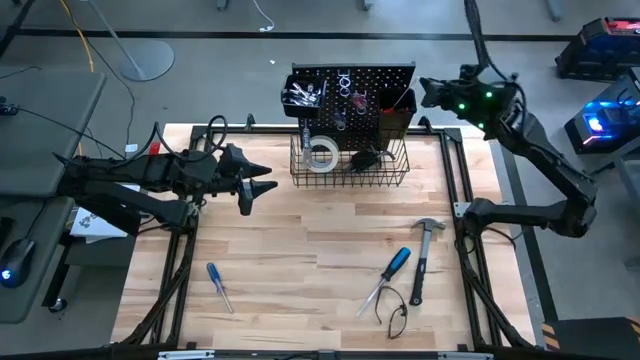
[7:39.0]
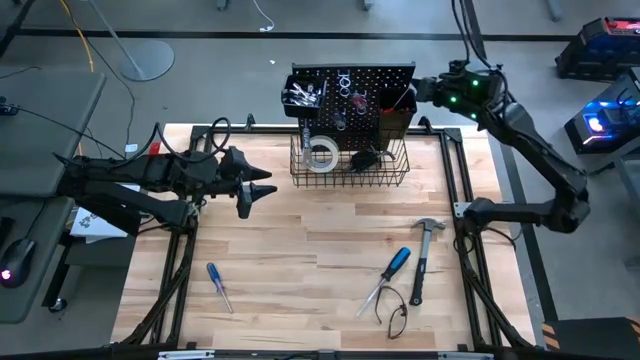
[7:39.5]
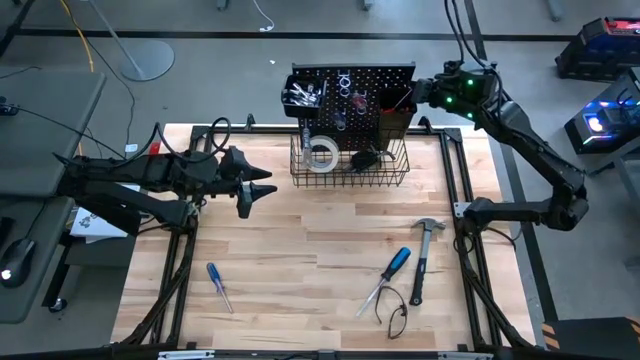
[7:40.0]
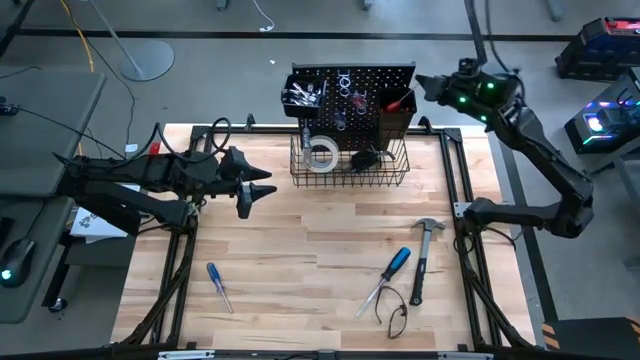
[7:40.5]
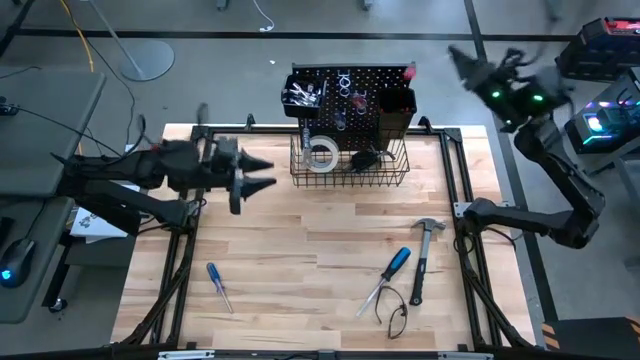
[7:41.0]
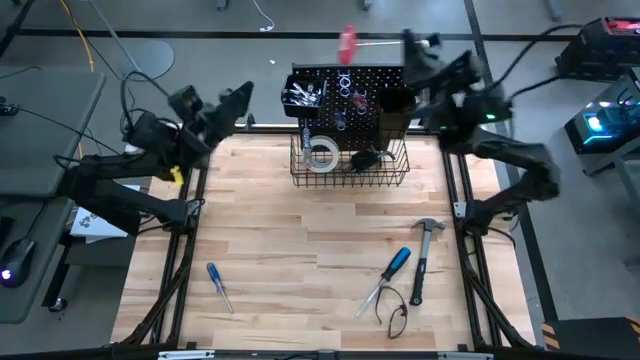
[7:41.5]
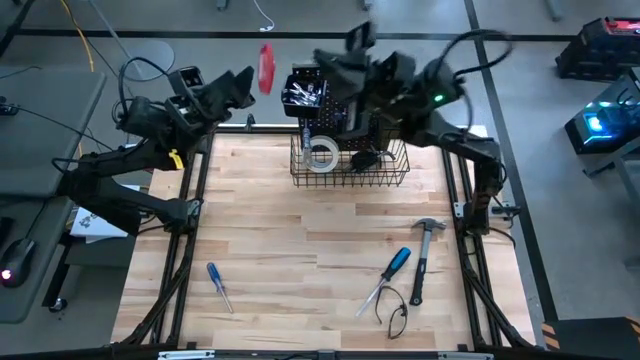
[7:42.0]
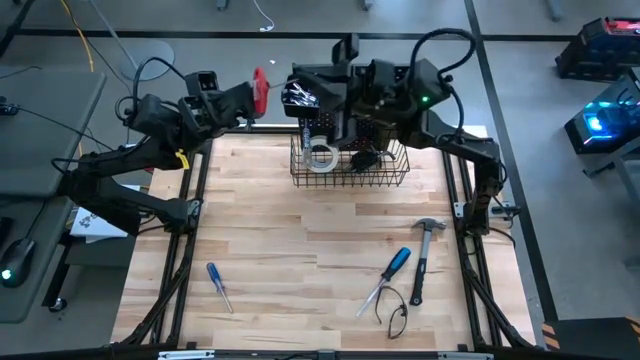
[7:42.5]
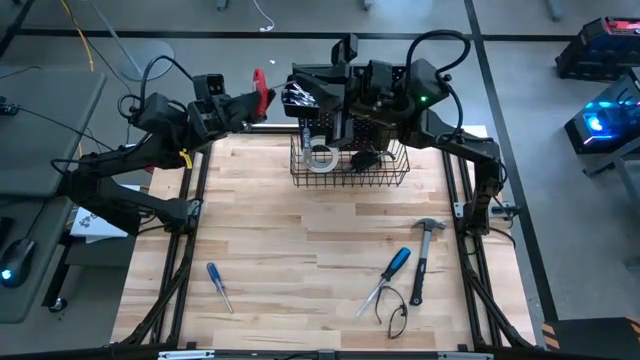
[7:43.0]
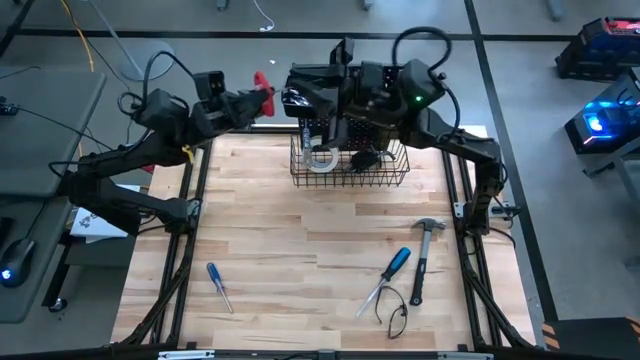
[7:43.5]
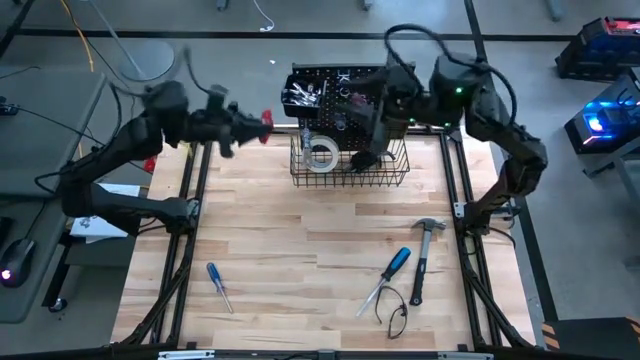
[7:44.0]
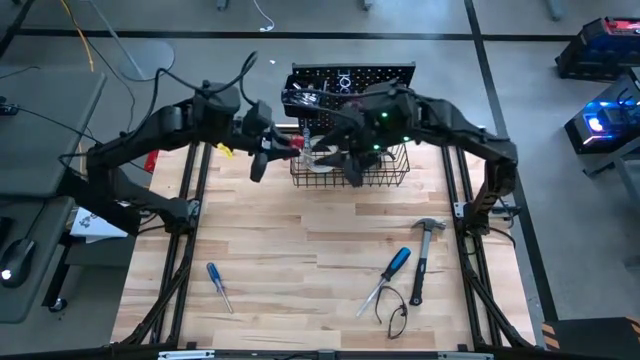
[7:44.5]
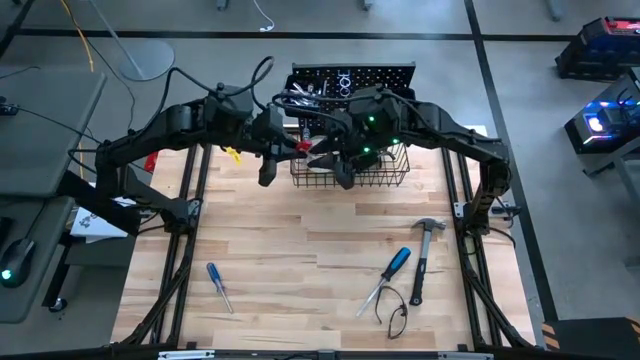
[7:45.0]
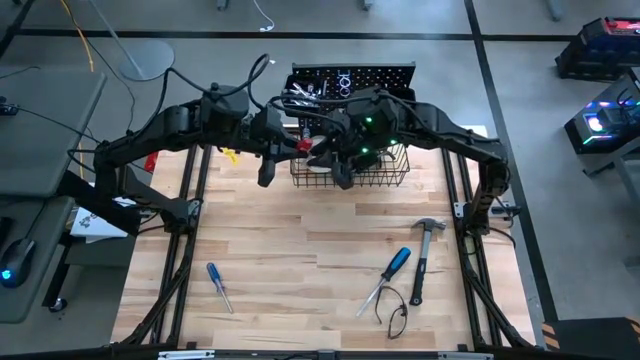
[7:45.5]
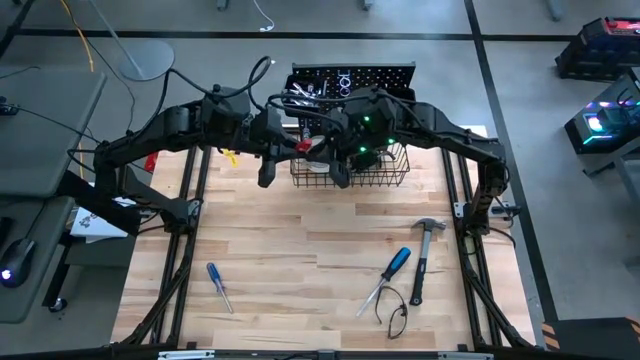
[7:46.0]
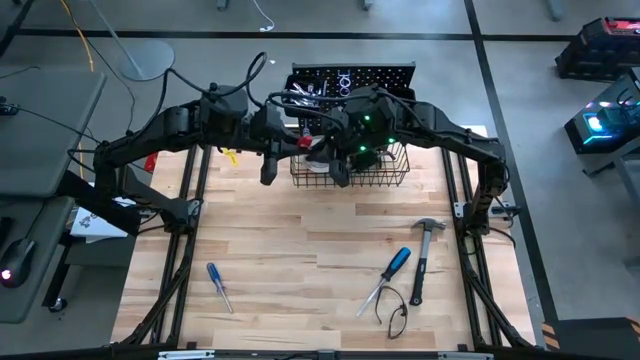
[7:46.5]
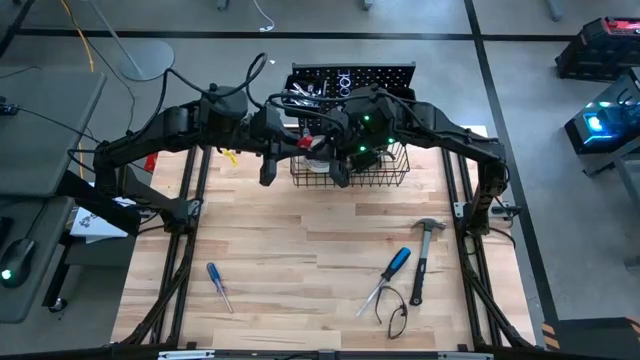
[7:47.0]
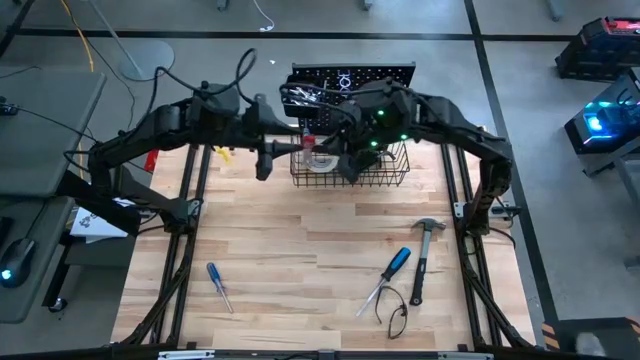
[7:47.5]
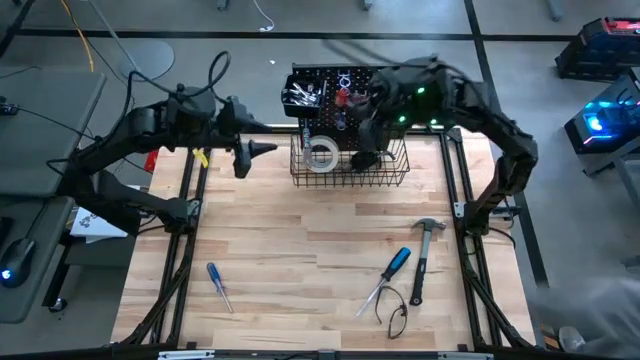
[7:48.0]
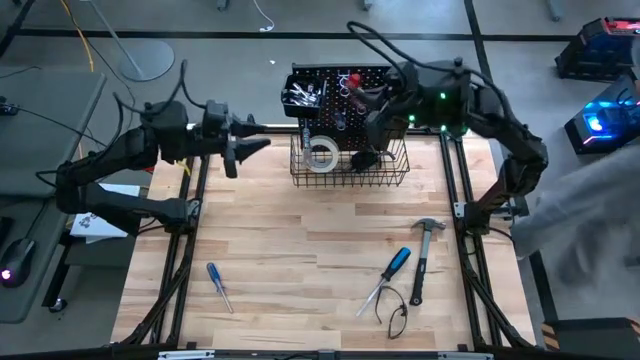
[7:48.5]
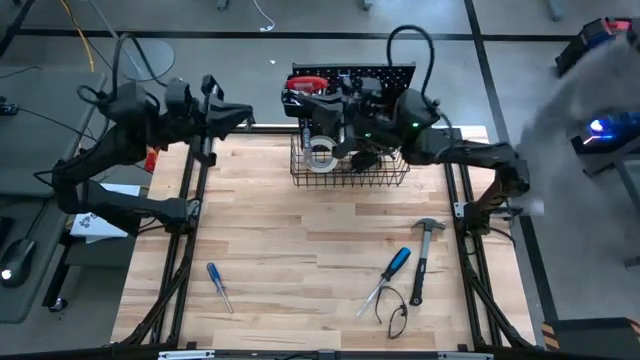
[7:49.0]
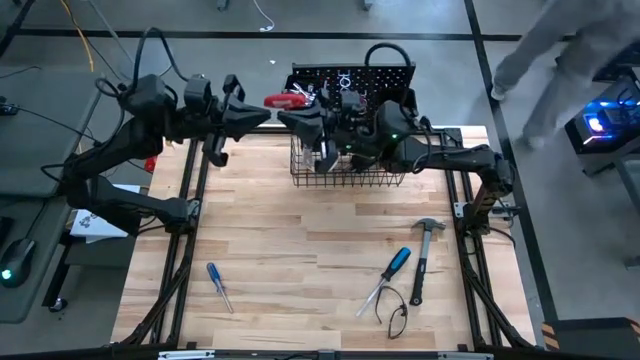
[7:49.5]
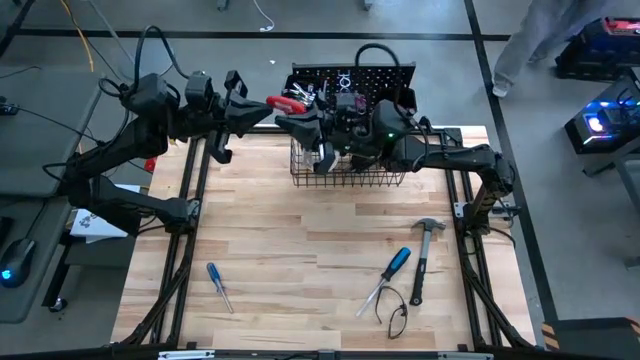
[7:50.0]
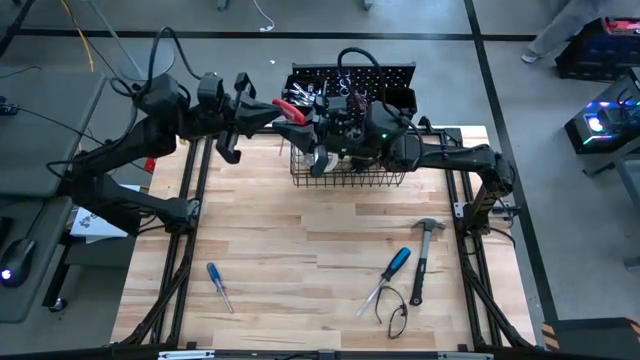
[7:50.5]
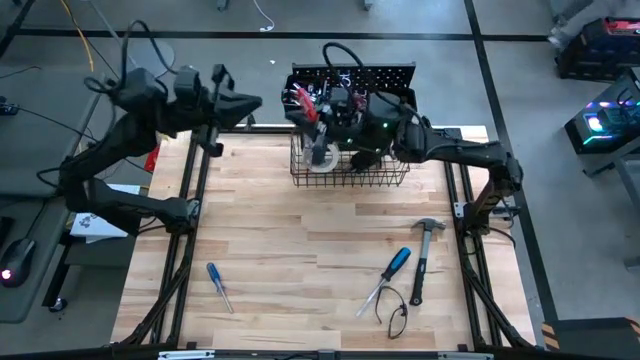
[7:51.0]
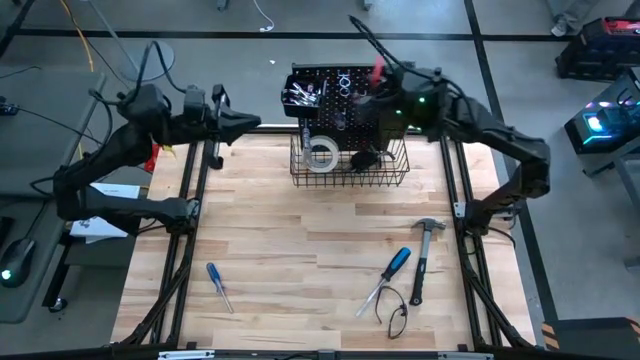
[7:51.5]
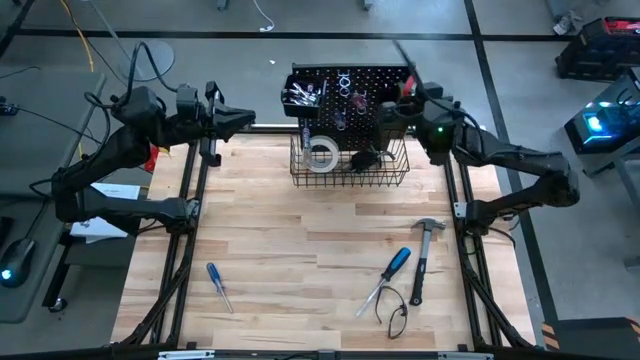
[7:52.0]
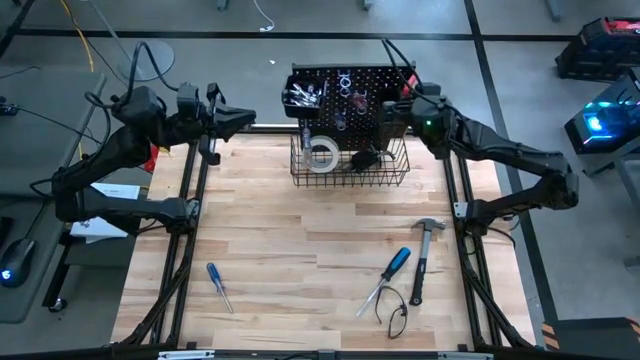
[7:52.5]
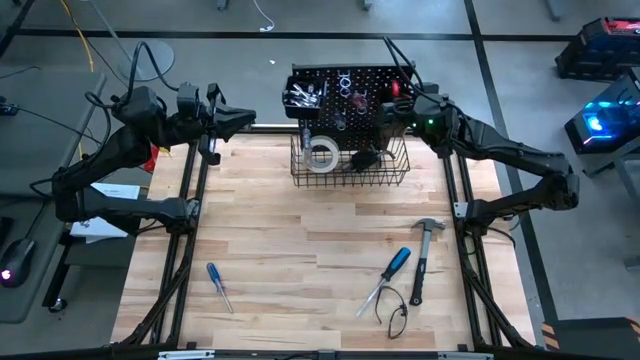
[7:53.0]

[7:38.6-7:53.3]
Task: Hang tools onto peg board
Put the red allen wrench in the right black bin on the pegboard

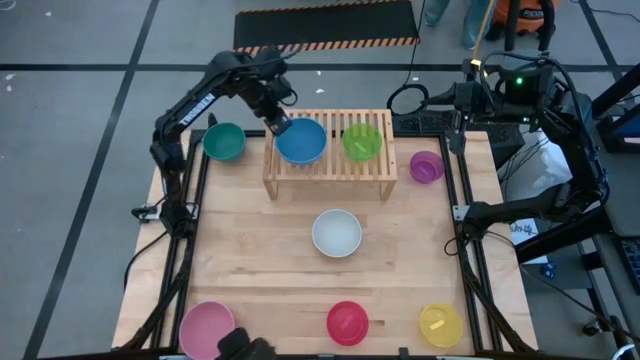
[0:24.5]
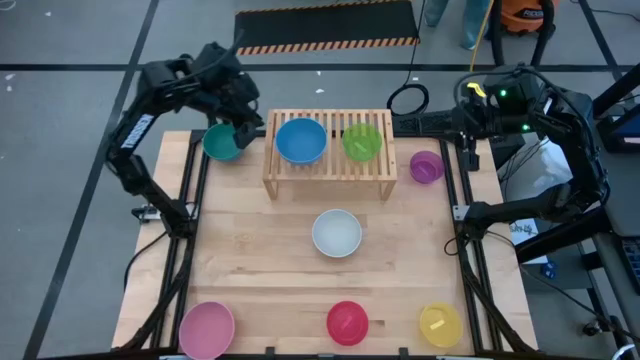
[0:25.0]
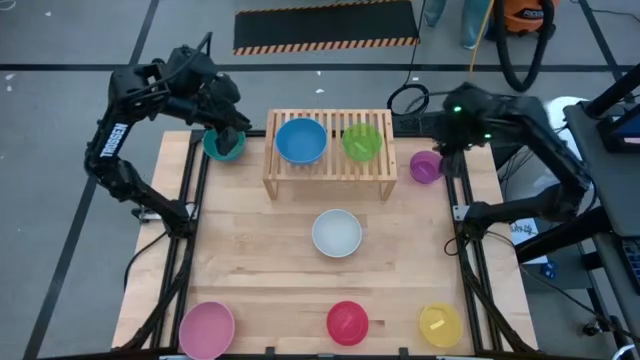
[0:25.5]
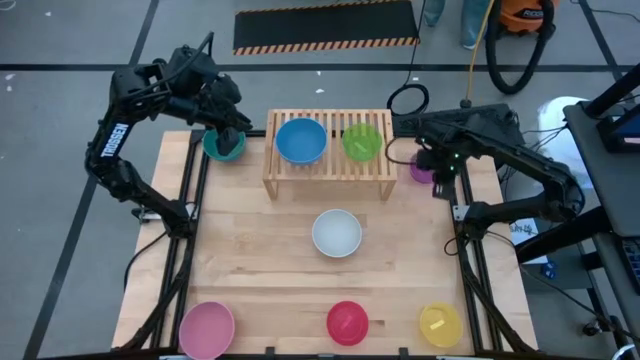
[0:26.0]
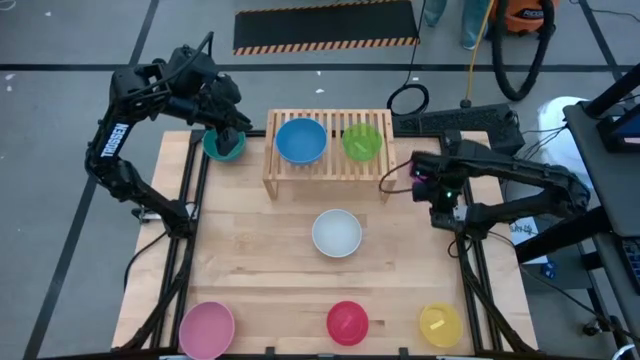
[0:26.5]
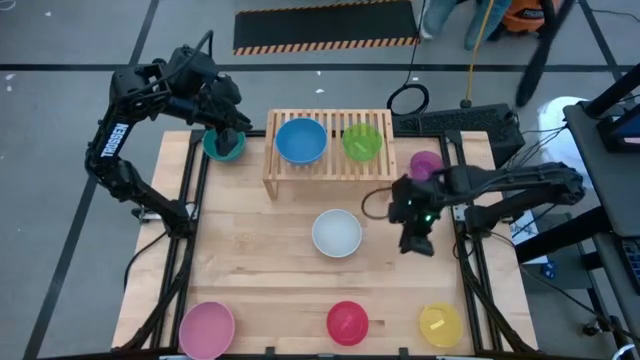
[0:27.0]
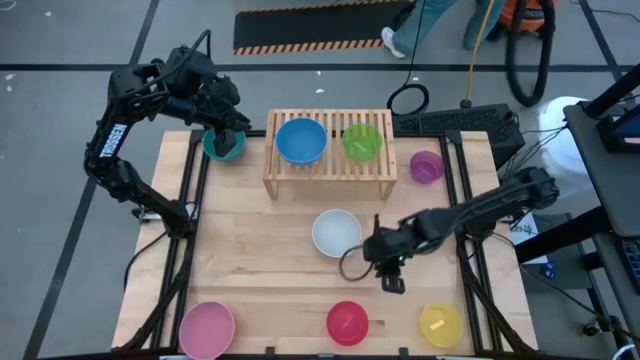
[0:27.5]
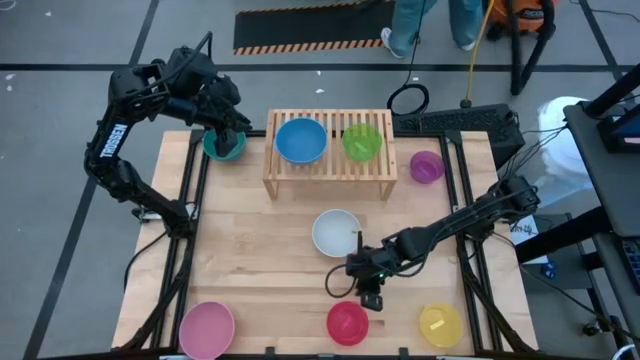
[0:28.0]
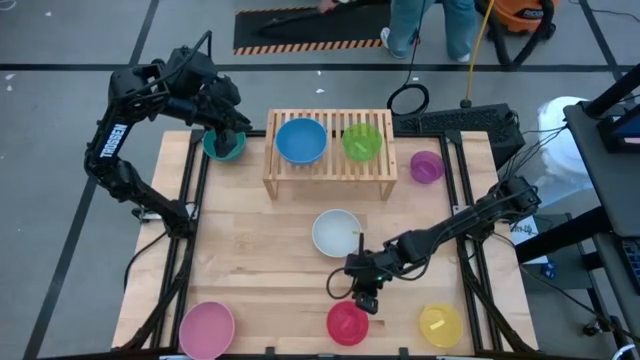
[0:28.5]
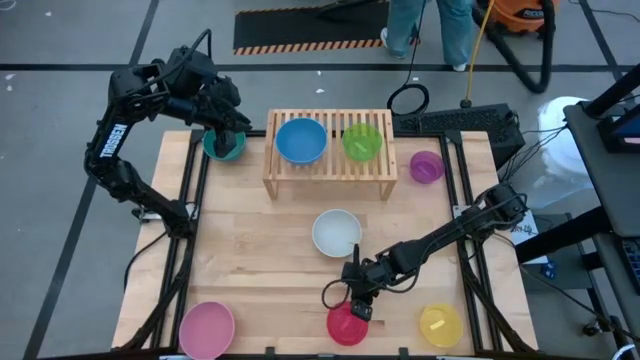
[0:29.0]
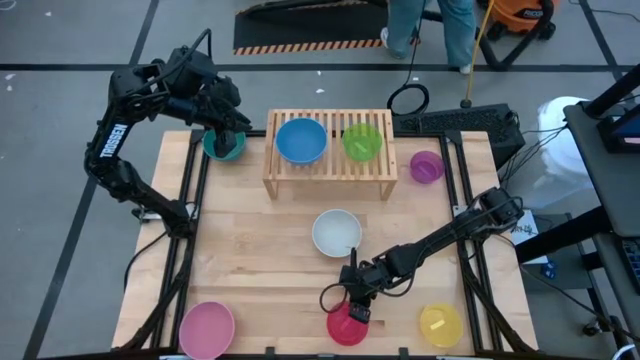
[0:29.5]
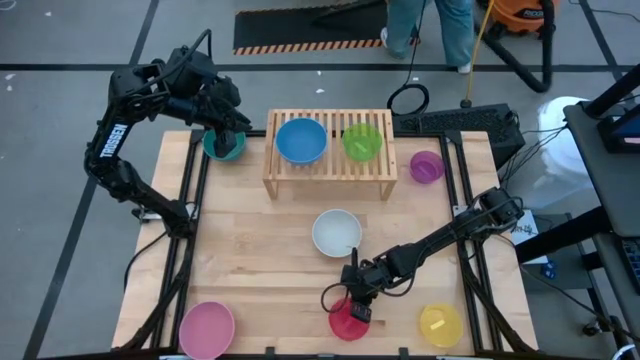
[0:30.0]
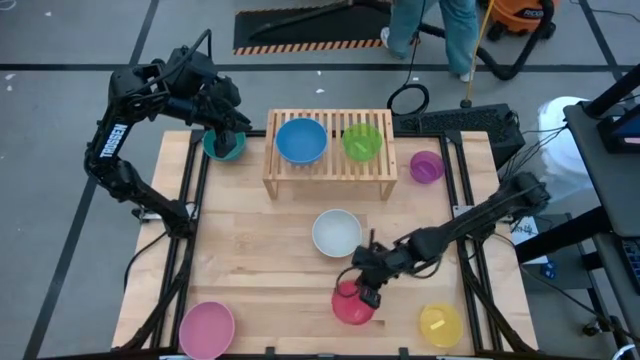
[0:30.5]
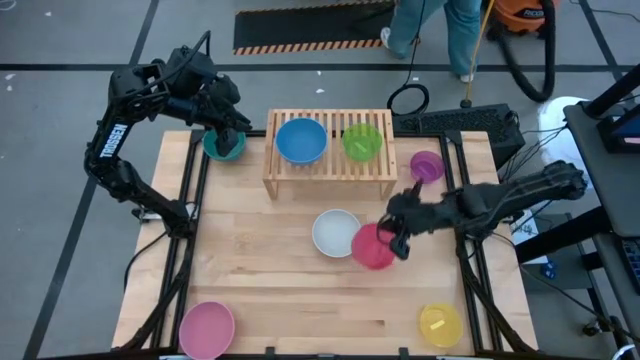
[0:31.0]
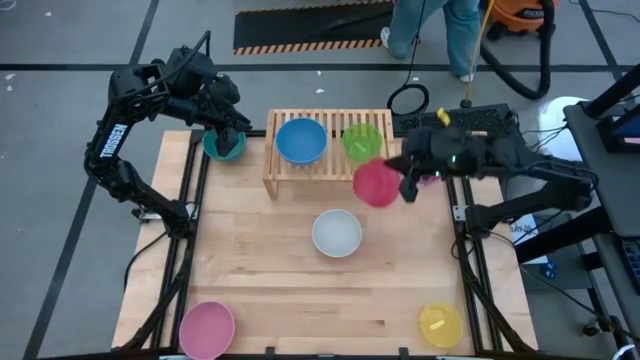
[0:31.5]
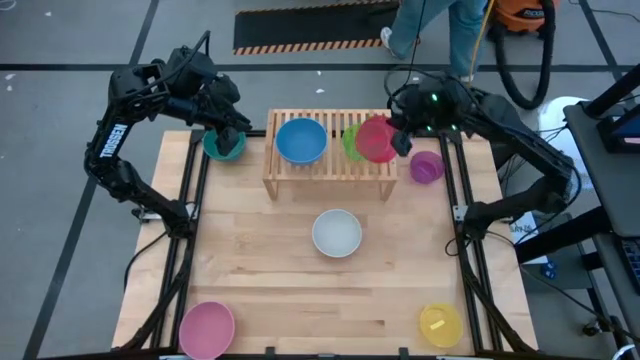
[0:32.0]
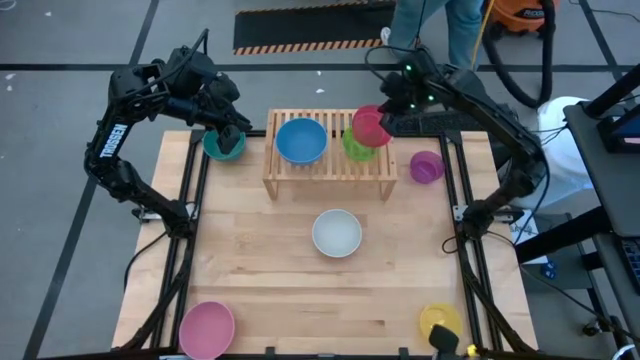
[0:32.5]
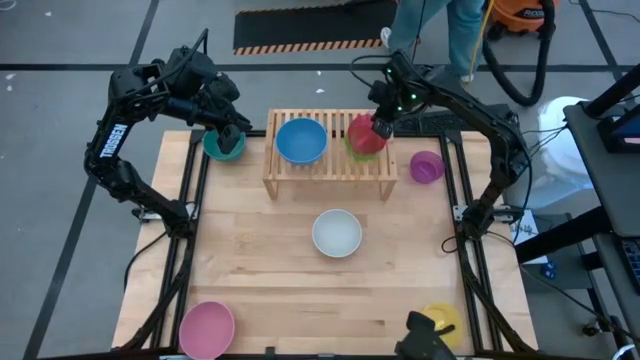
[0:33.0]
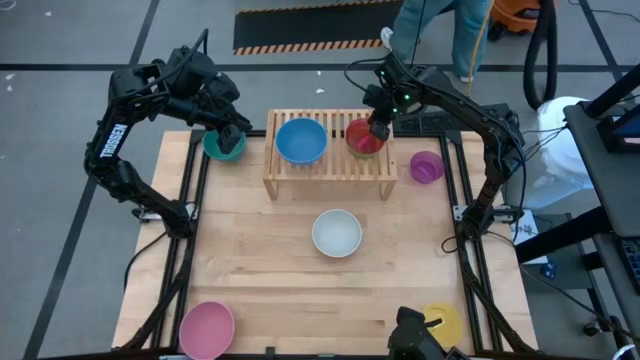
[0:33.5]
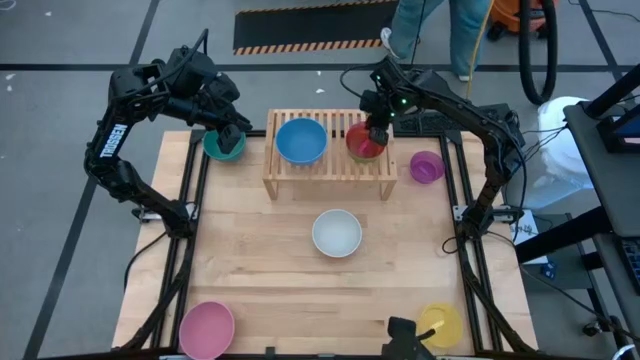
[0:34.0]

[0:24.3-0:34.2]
Task: Place and stack bowls onto a shelf
Stack the red bowl on top of the green bowl on the shelf
